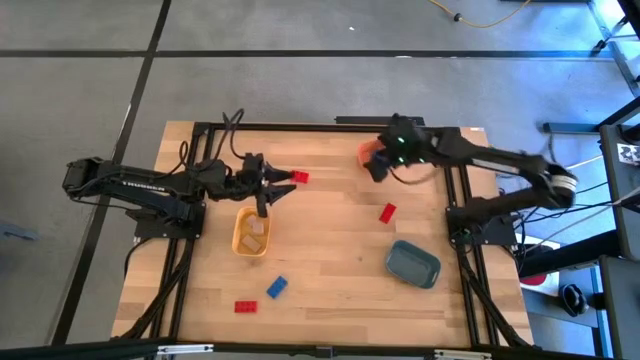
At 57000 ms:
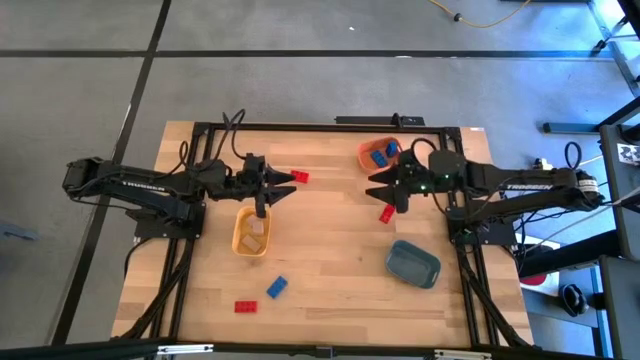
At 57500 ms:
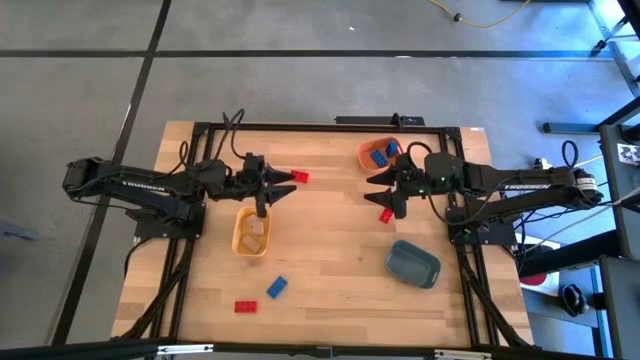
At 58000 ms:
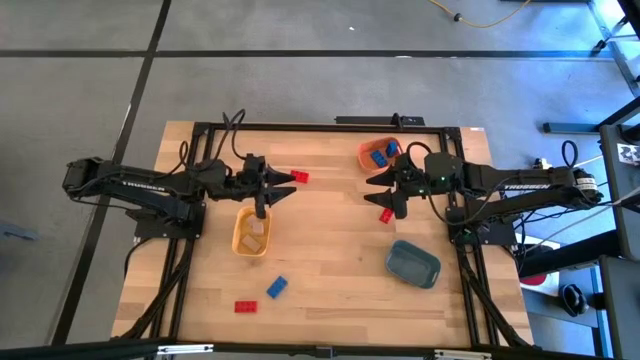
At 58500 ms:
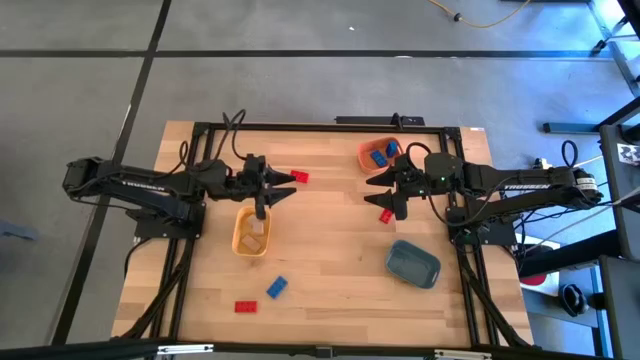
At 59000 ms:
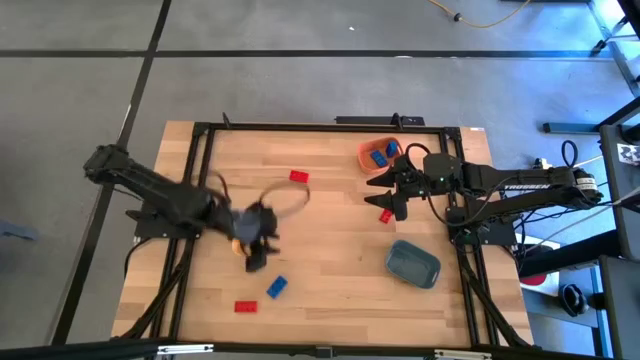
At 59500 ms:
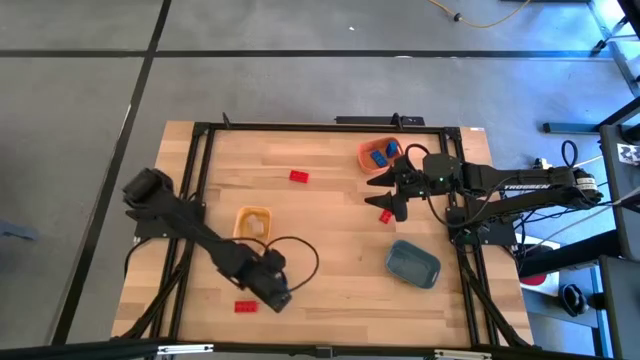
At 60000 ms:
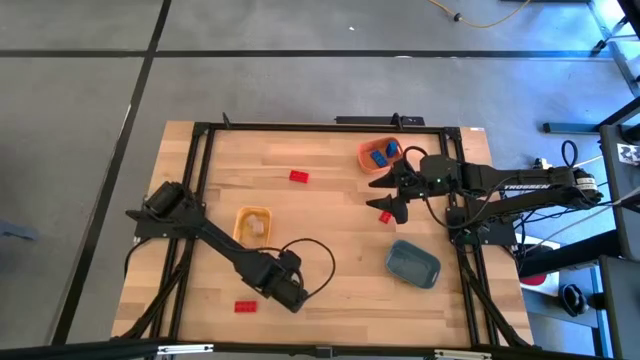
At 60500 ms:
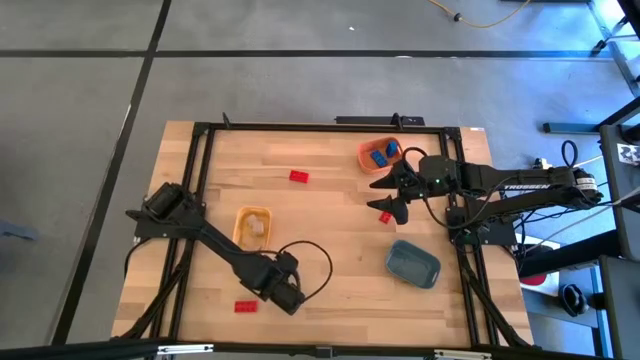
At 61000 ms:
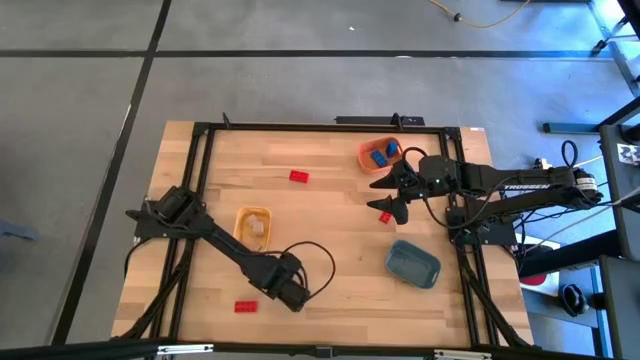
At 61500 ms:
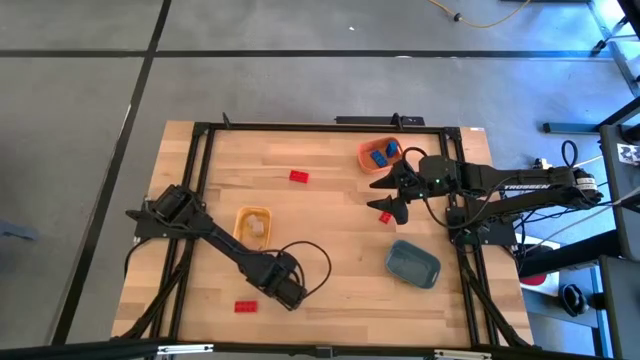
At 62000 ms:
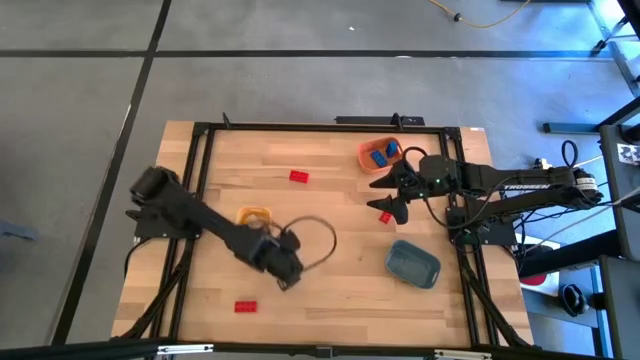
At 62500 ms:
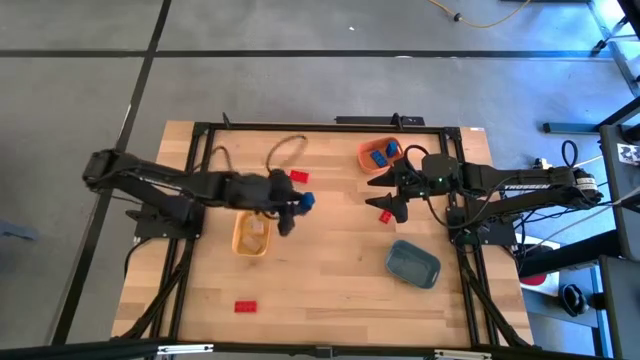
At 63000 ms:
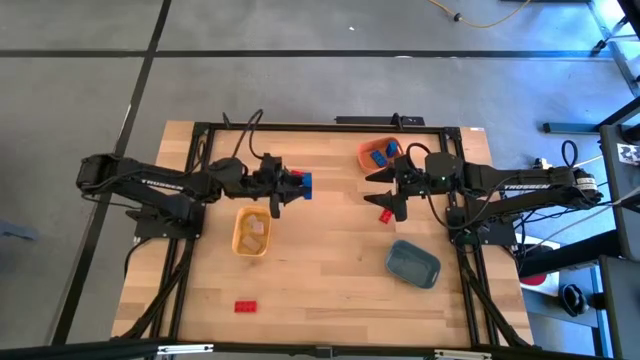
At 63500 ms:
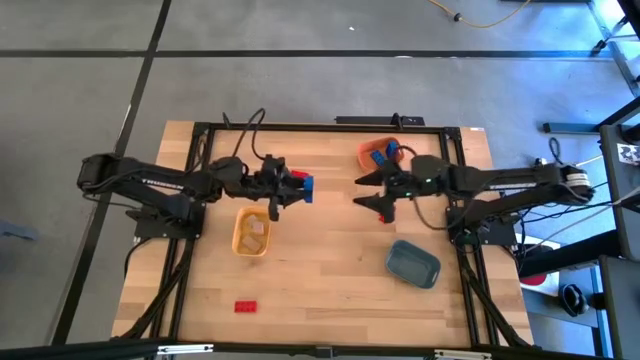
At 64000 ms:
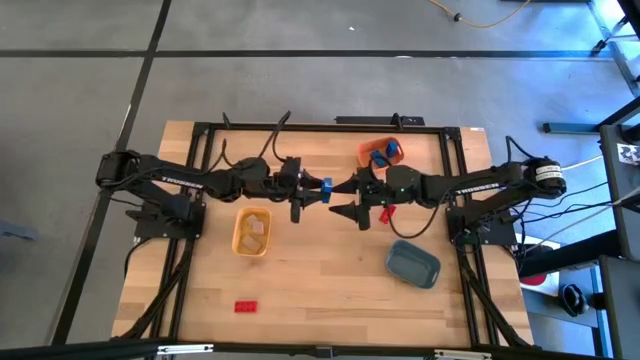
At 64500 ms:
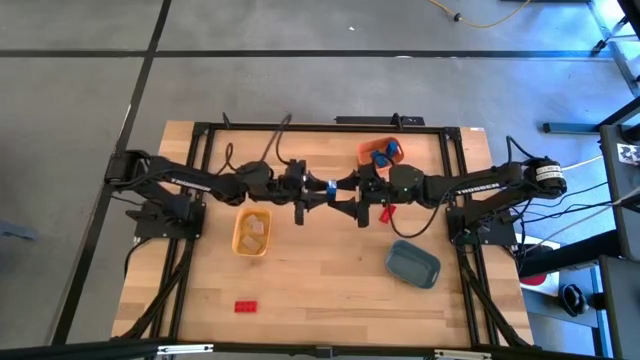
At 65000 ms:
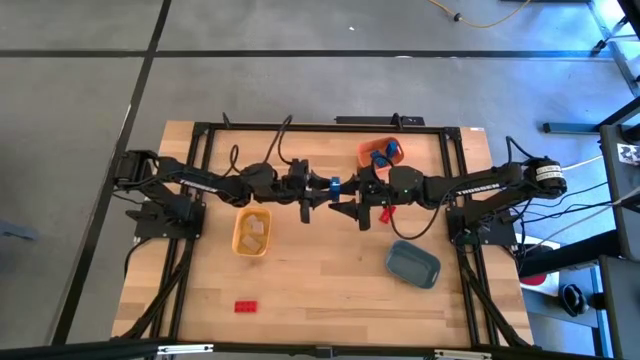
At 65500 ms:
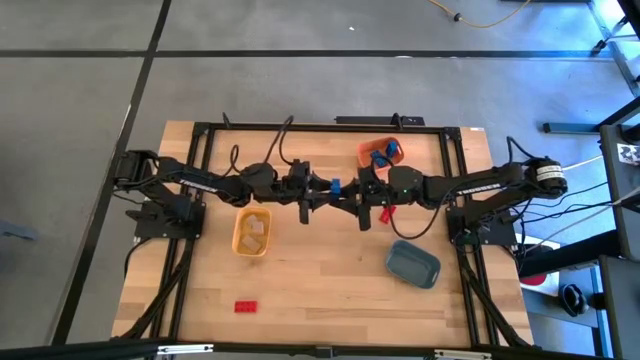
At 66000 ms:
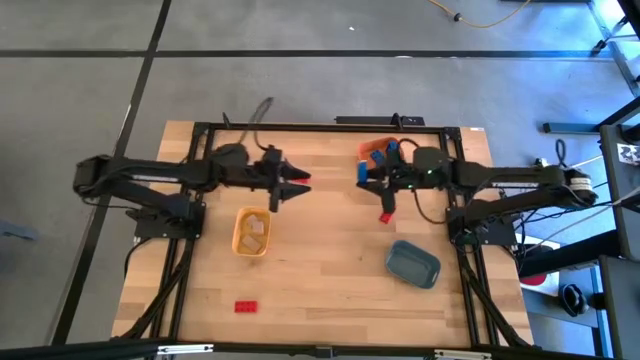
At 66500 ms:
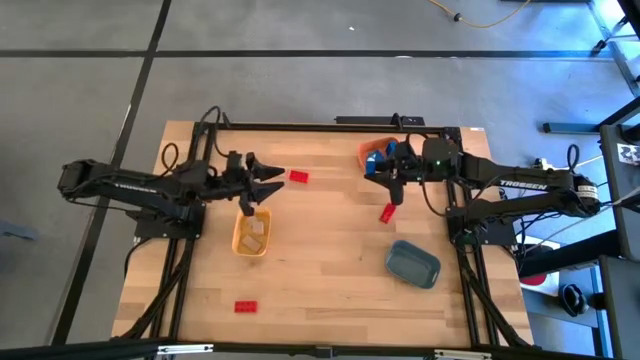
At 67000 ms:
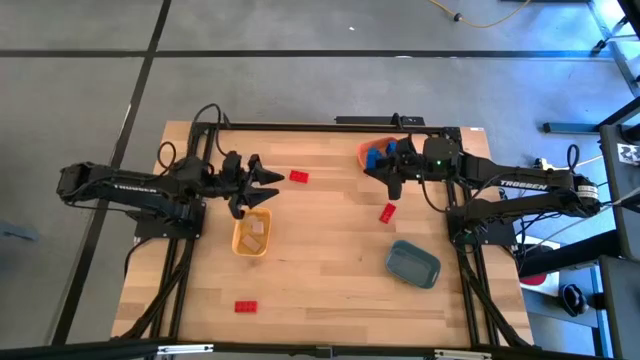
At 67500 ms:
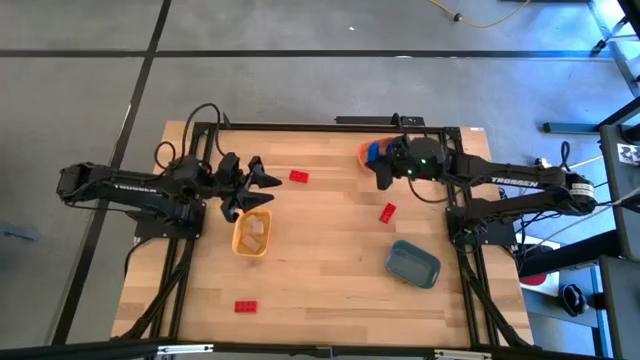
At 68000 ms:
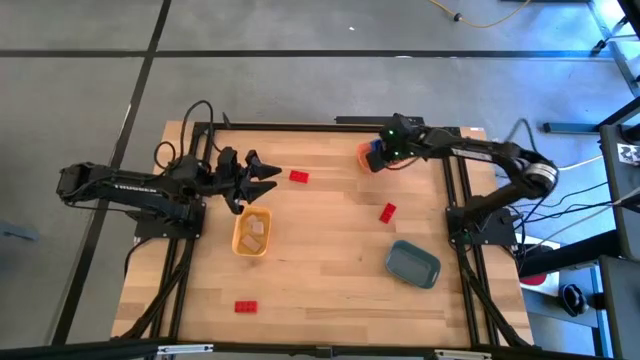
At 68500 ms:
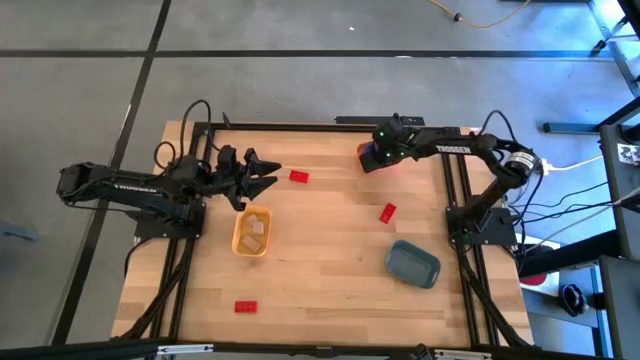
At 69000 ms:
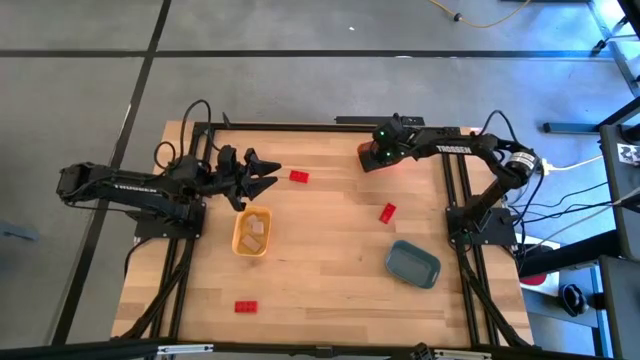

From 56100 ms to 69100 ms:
Task: Sort & place blocks by color
Put the blue game piece into the orange bin

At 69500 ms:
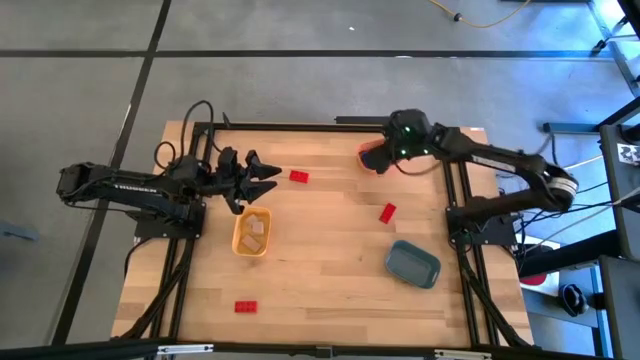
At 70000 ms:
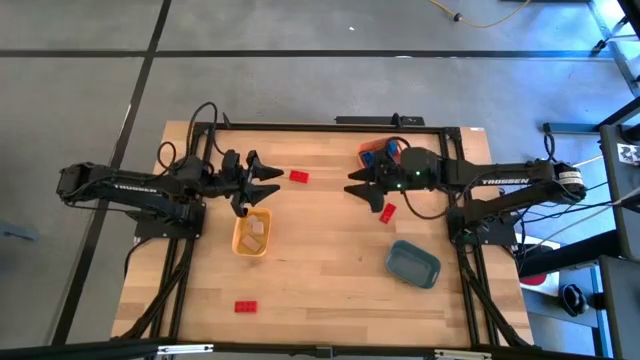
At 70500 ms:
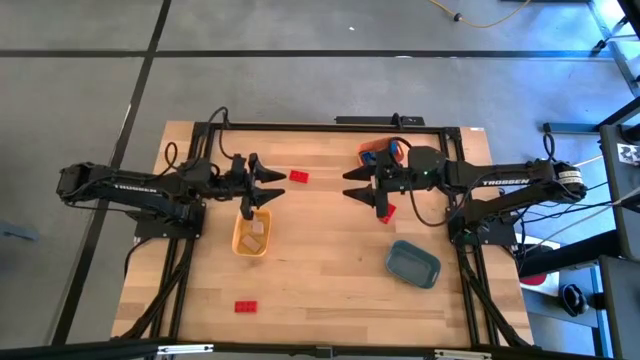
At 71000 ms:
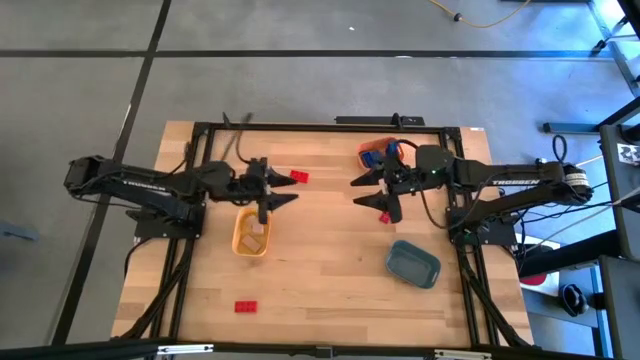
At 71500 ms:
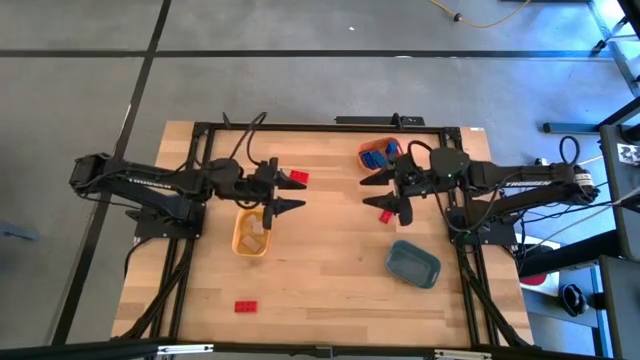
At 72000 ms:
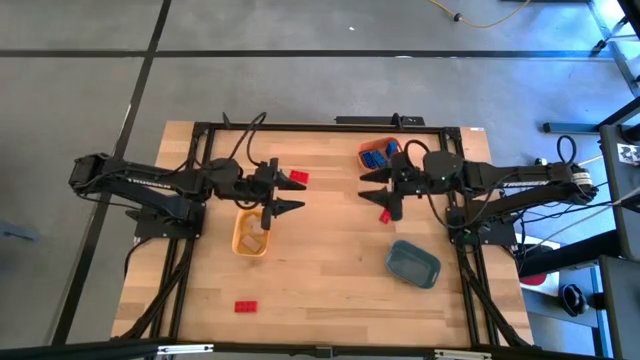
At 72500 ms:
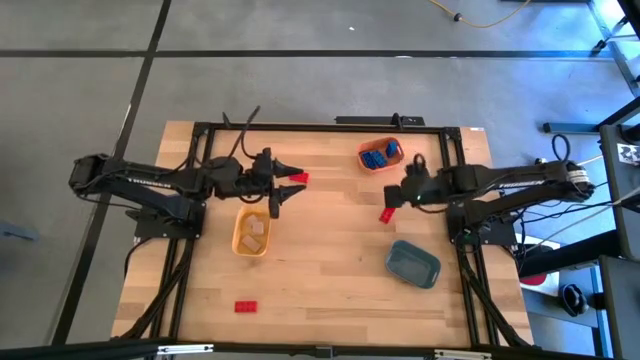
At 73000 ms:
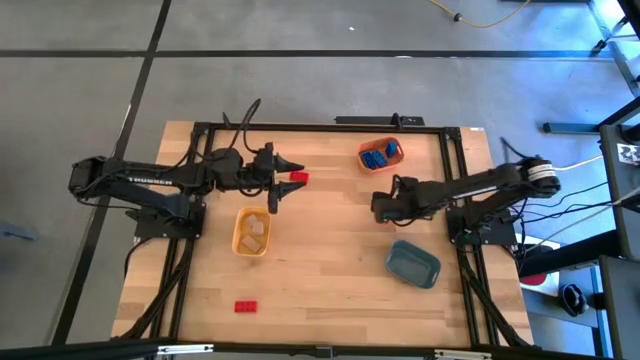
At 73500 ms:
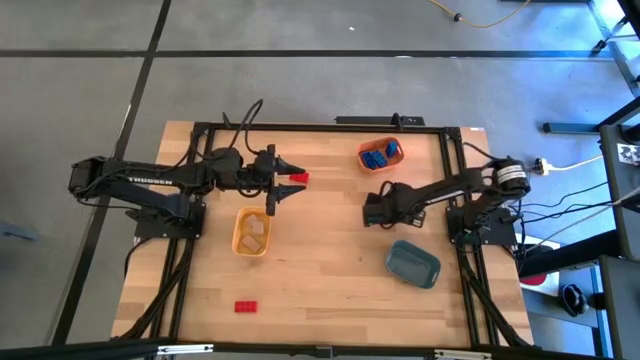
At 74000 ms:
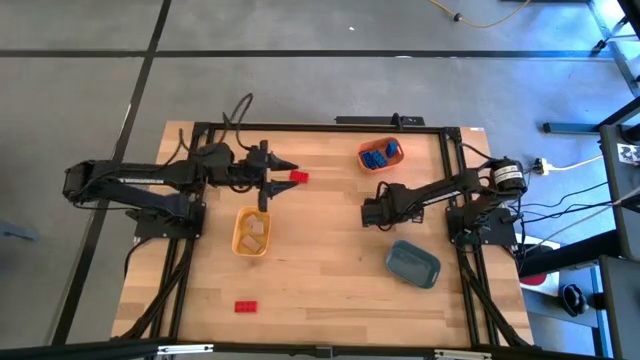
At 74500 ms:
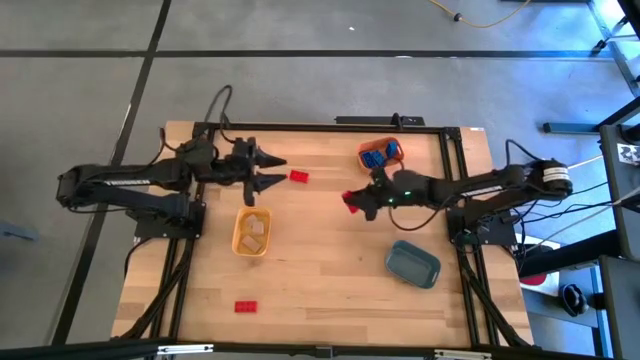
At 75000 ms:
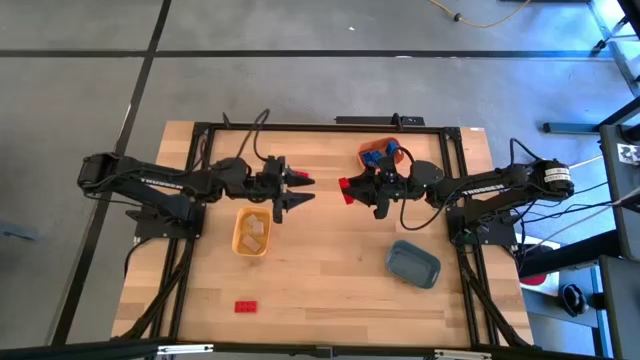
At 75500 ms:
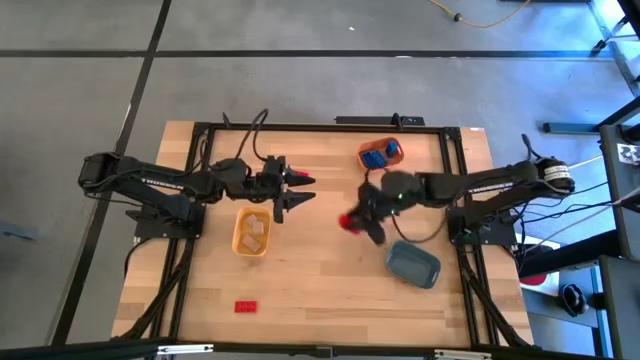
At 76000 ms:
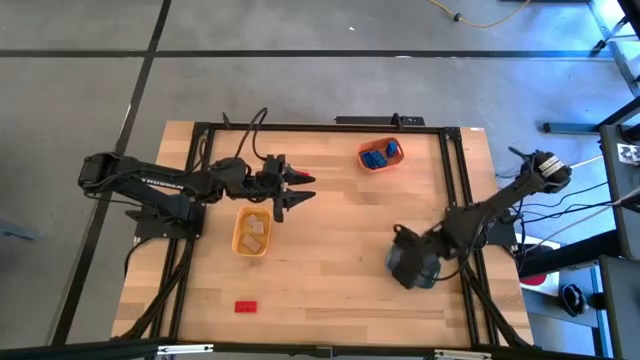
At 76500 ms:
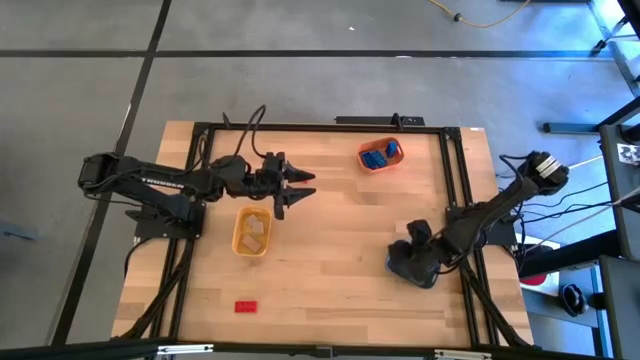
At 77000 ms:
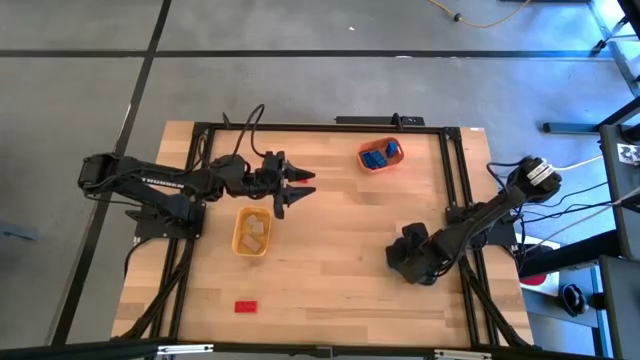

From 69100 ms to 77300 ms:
Put the middle right red game piece into the blue bin

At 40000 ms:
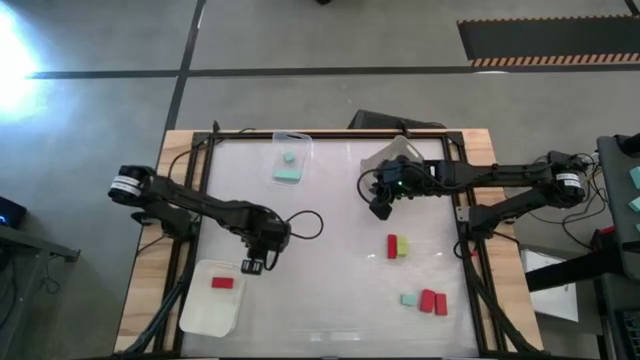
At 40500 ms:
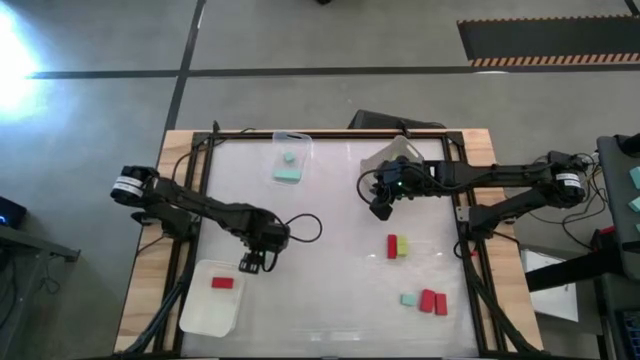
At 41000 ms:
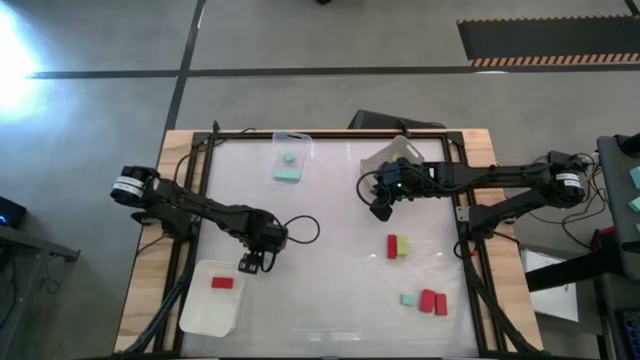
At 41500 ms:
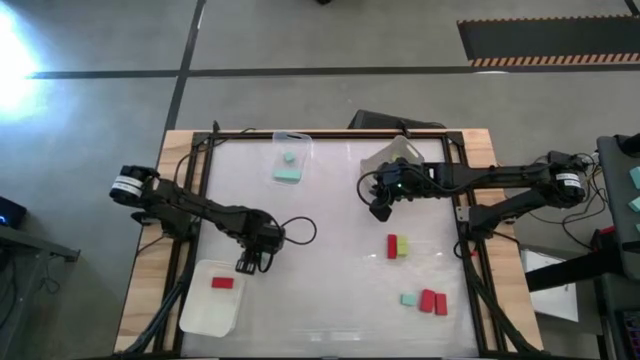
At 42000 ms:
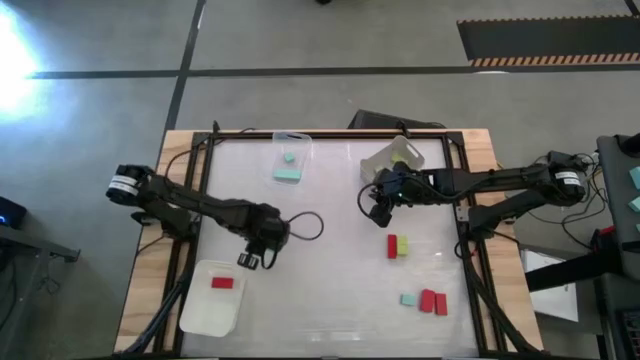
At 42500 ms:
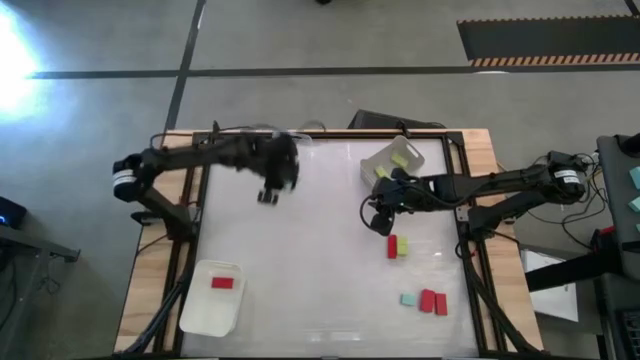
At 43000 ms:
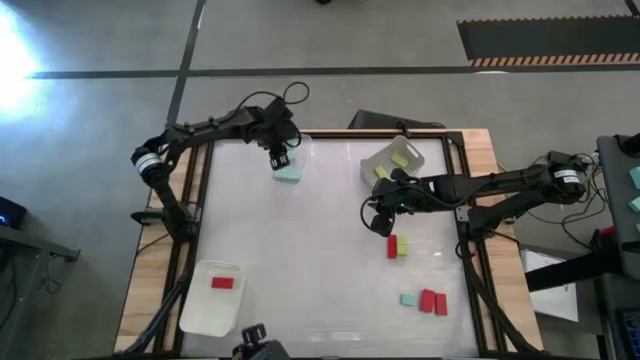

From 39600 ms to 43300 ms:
Task: Sort & place blocks by color
Put the light blue block into the transparent bin
